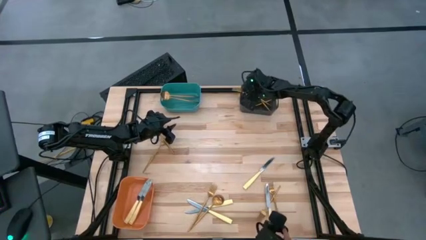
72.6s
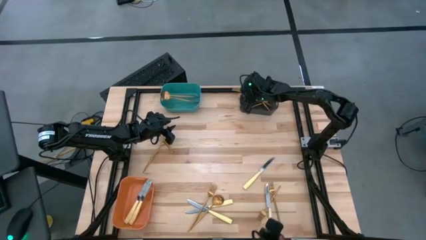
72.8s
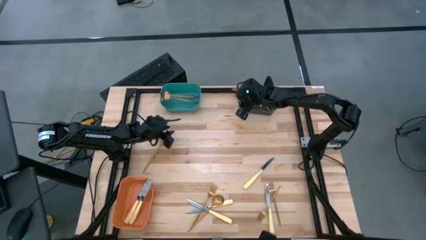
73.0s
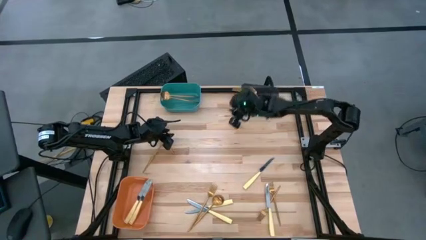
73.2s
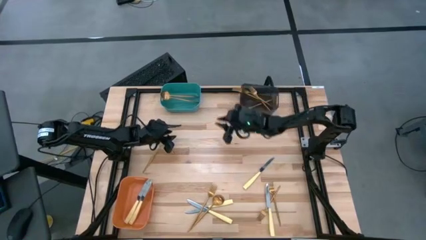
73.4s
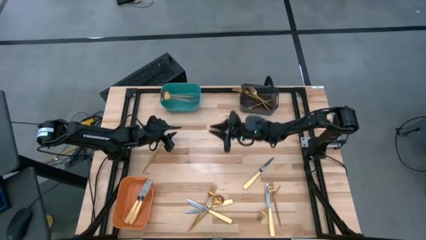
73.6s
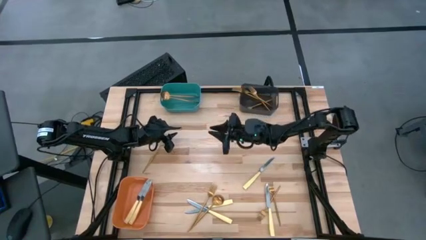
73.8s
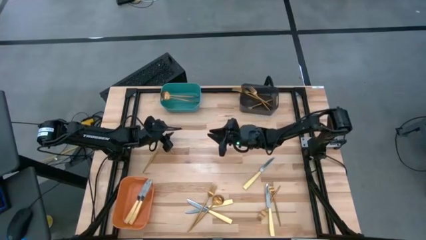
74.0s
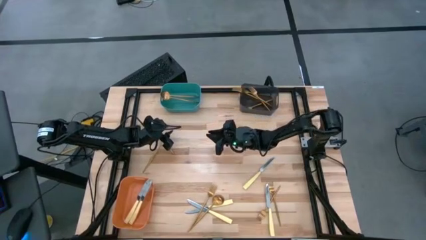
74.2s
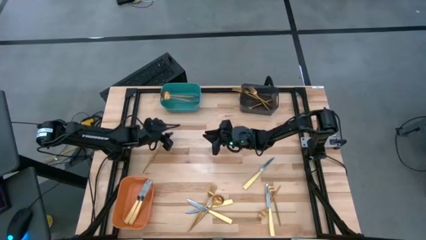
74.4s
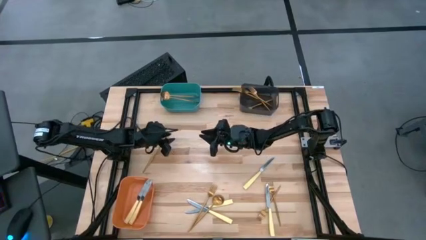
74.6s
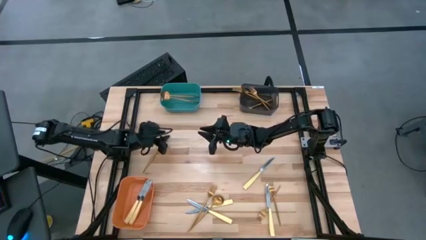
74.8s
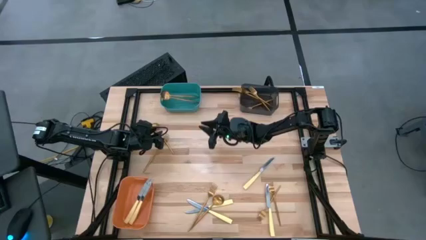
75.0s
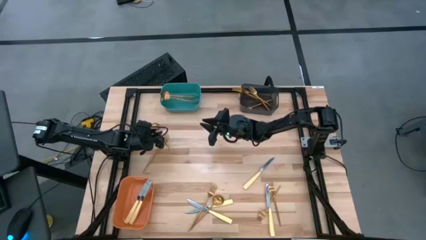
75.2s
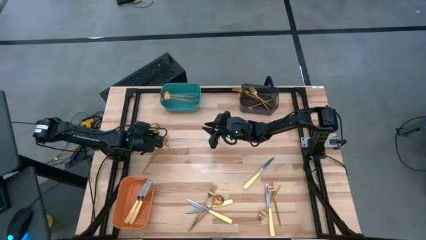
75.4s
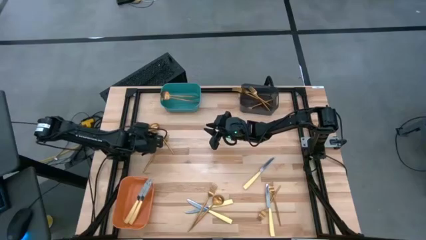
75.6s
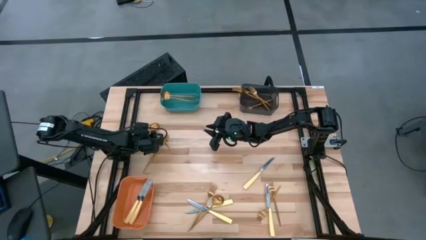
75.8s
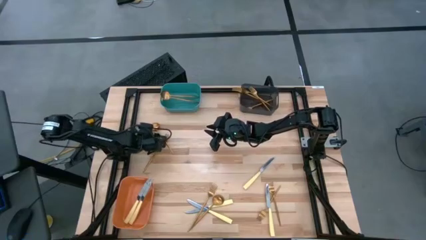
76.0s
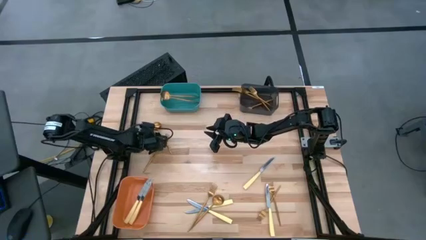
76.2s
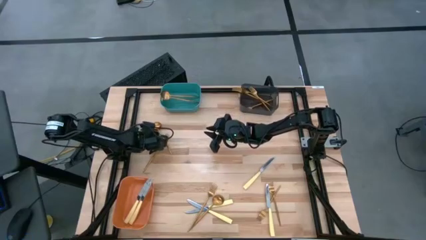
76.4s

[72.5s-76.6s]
Task: Sort silverware by color (type)
Put the gold spoon into the green bin

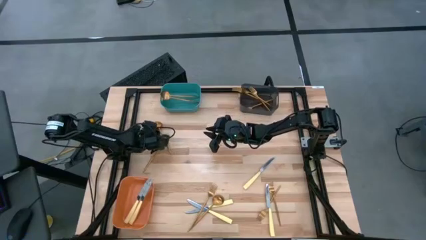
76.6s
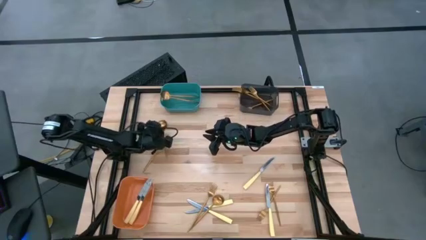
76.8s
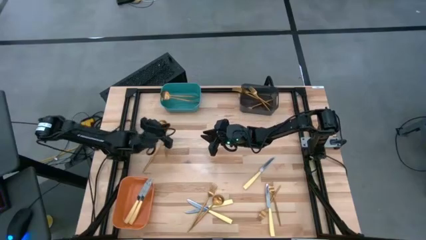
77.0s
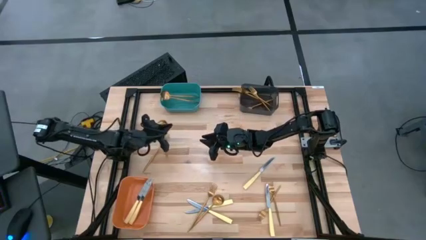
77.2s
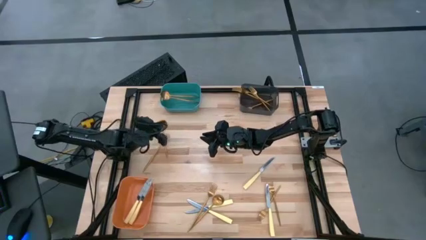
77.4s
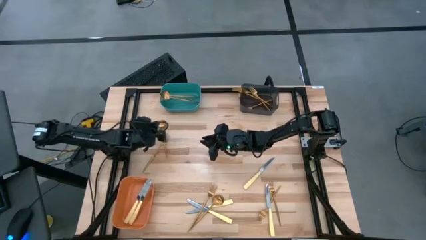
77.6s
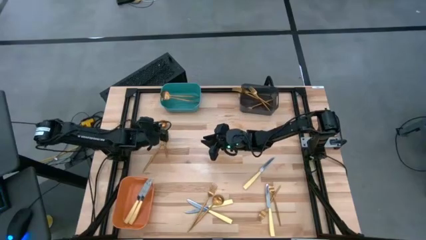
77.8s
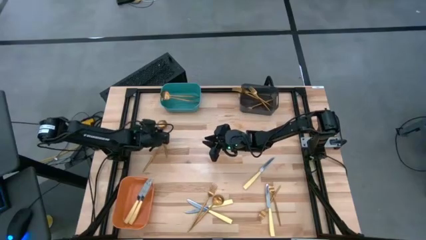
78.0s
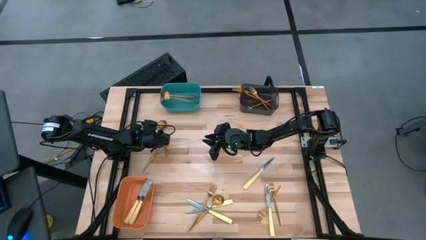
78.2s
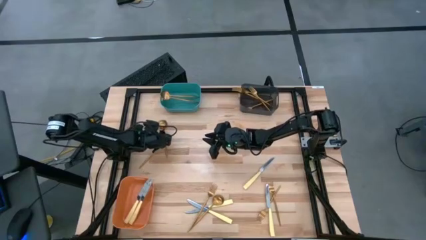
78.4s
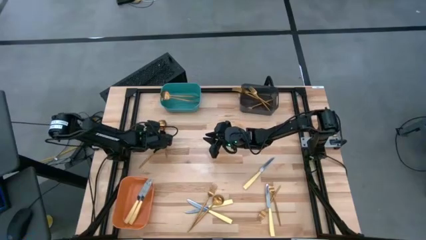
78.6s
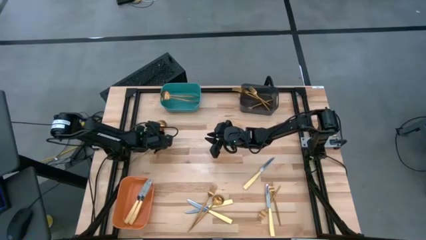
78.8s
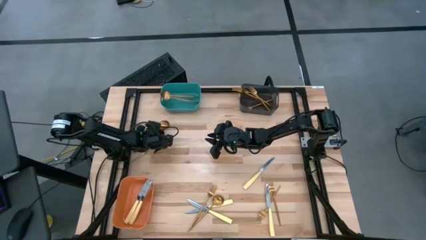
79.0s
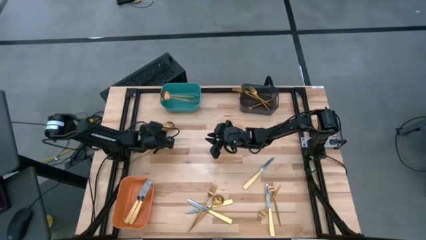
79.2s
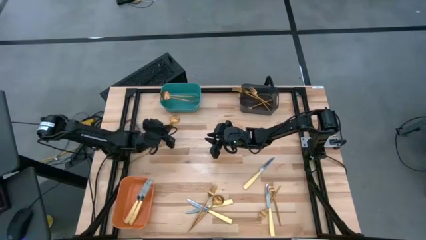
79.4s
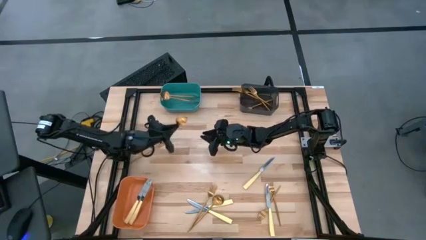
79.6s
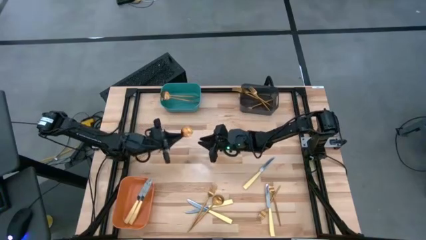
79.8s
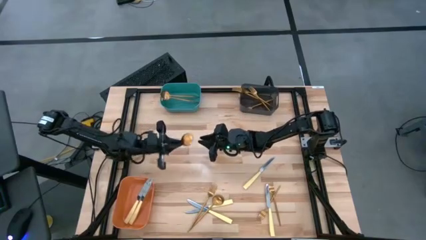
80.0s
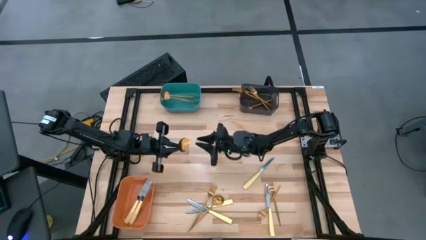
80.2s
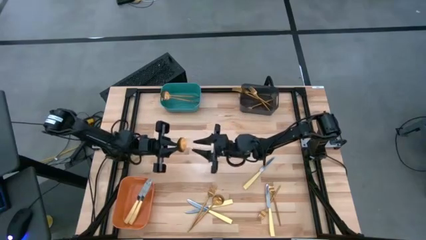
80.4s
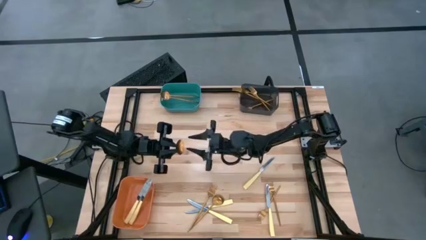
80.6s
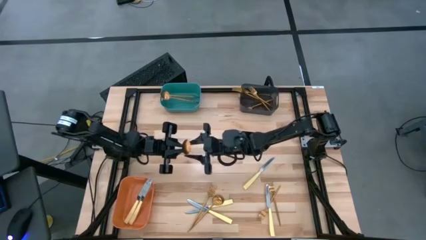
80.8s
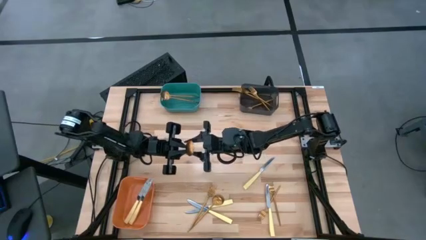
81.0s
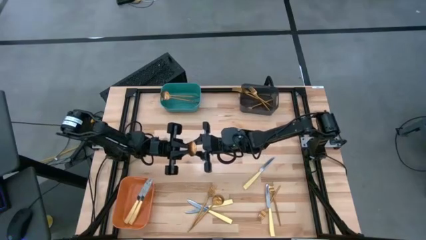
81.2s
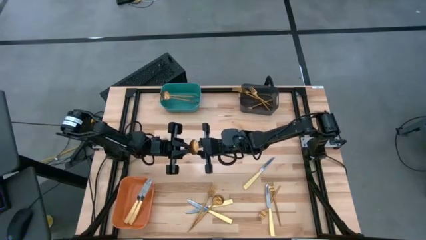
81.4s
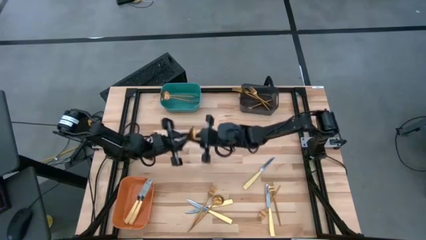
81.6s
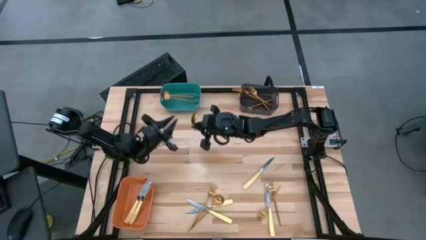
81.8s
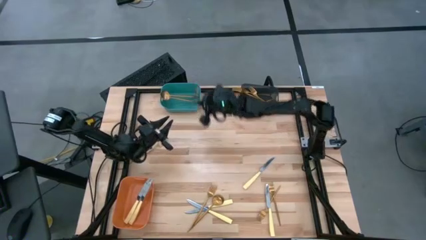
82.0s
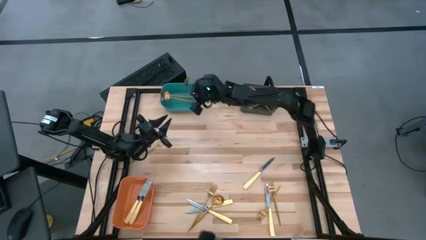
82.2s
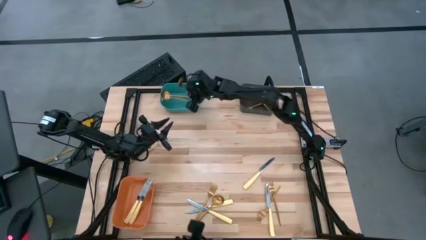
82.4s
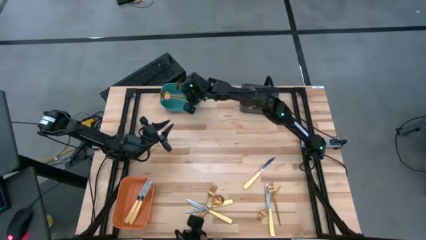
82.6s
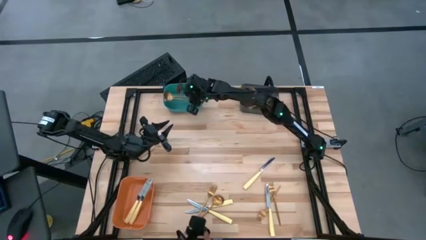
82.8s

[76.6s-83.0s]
Put the gold spoon into the green bin

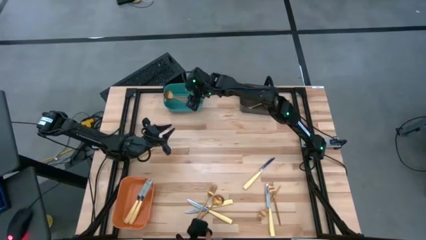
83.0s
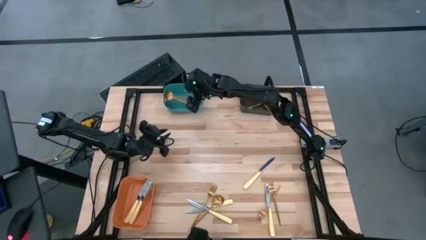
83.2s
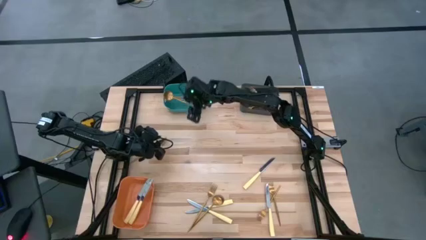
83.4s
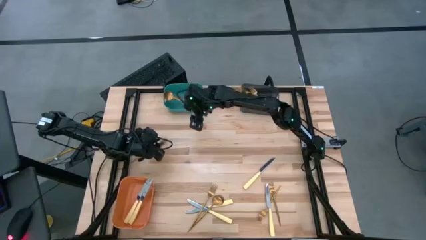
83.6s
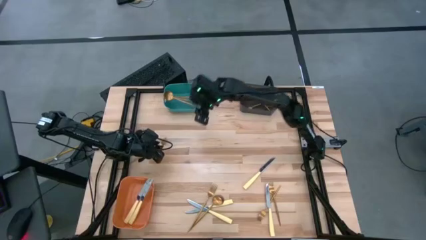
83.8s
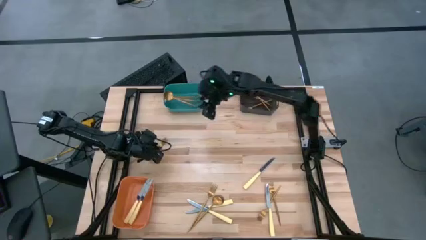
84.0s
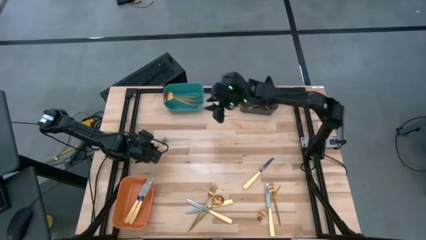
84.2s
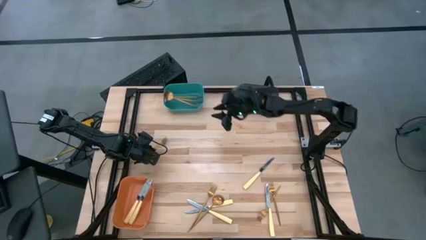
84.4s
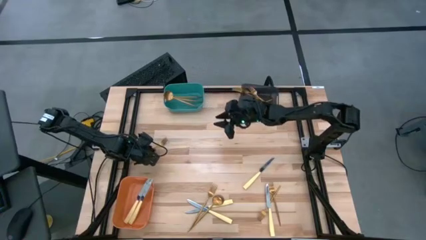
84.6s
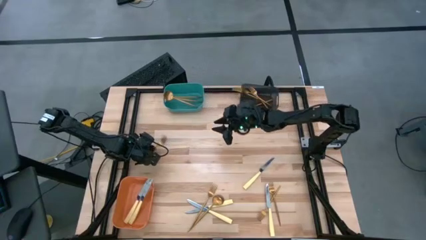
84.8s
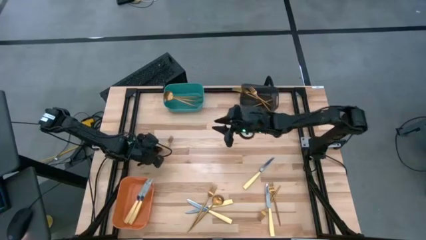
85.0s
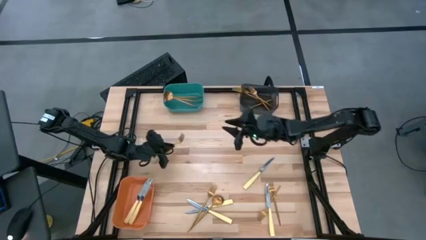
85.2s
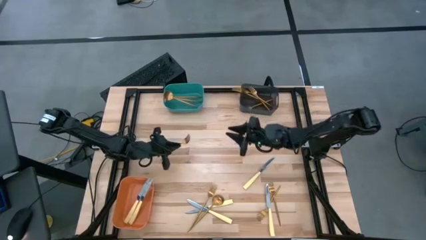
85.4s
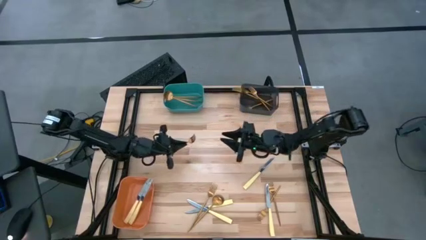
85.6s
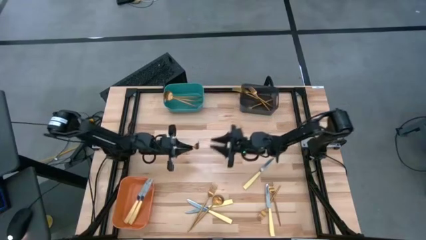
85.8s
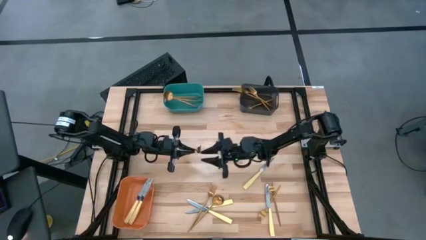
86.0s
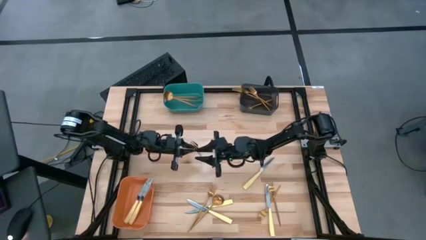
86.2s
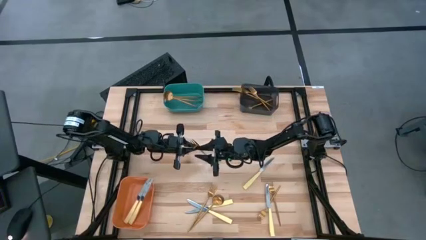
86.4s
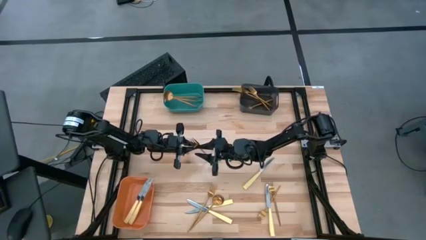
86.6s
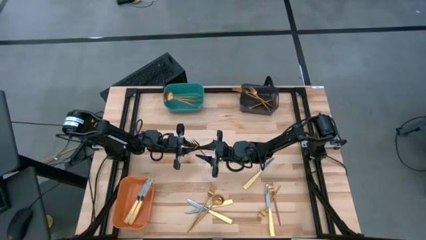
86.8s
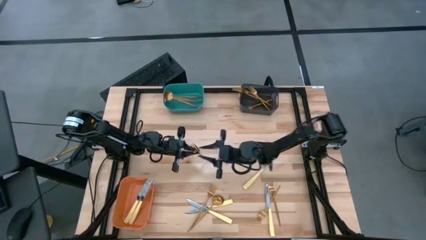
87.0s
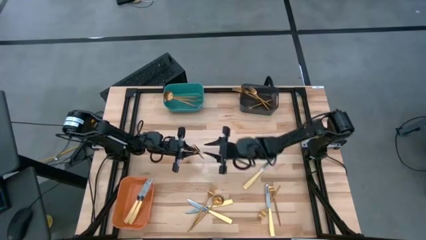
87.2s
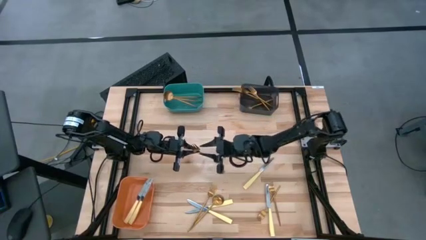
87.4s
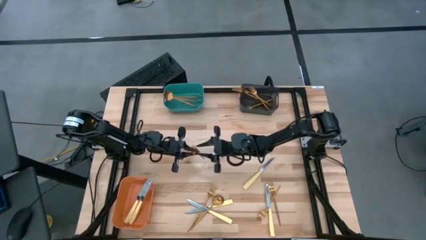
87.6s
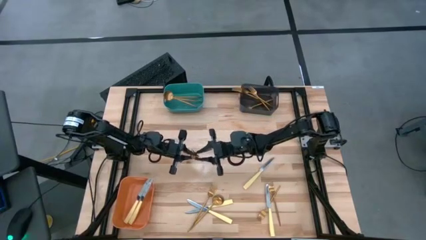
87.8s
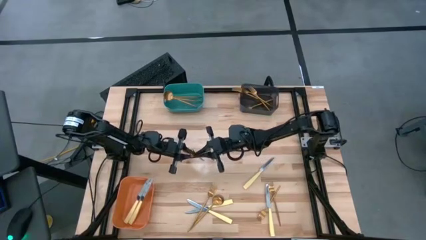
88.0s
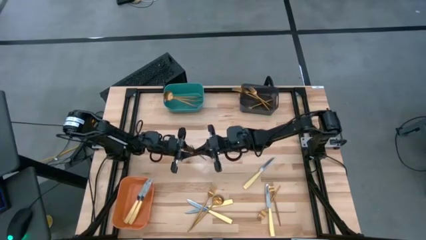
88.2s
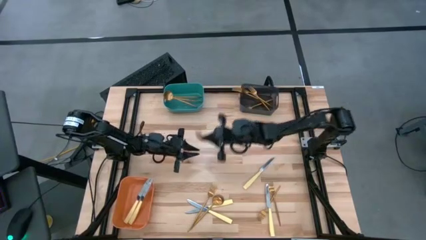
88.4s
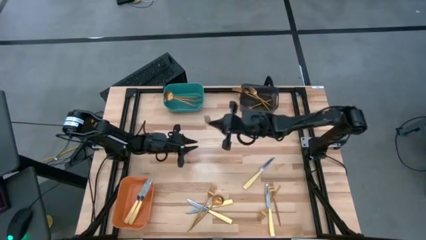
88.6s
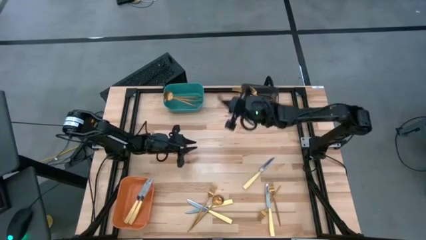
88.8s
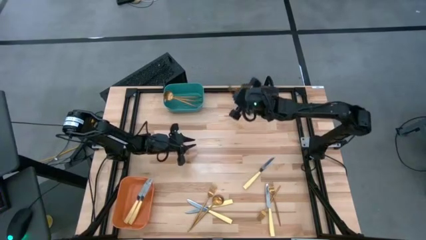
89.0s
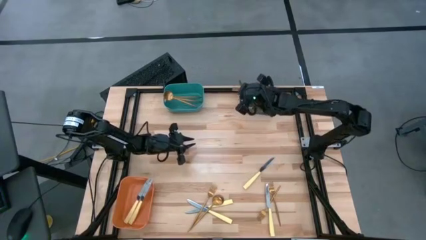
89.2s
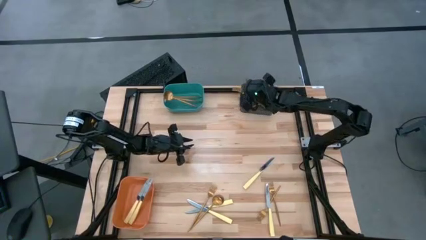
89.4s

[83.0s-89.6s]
Put the gold fork into the black bin
